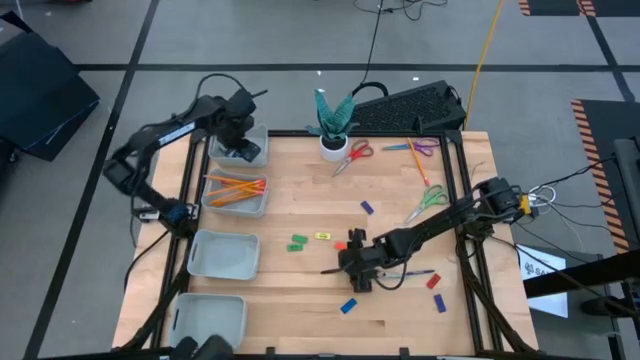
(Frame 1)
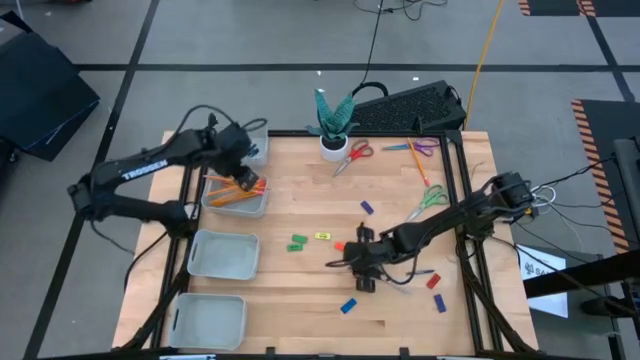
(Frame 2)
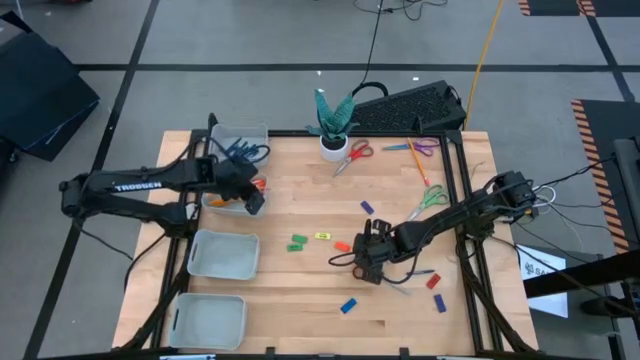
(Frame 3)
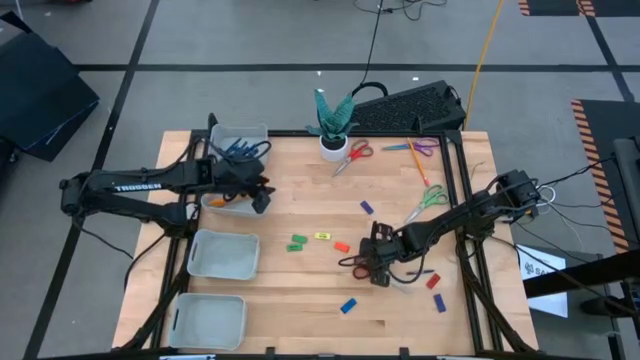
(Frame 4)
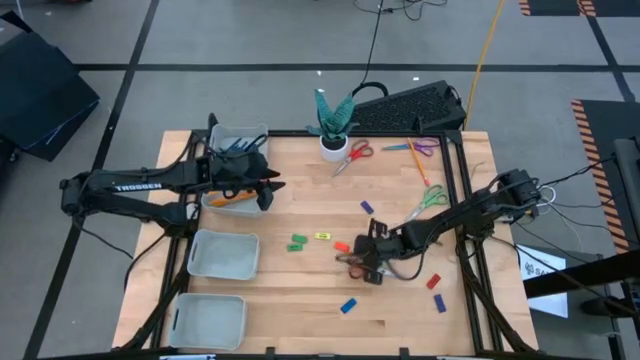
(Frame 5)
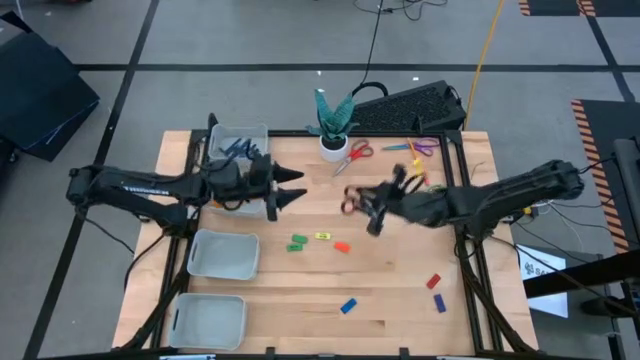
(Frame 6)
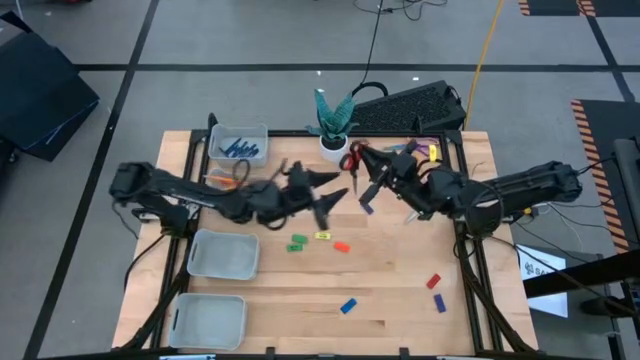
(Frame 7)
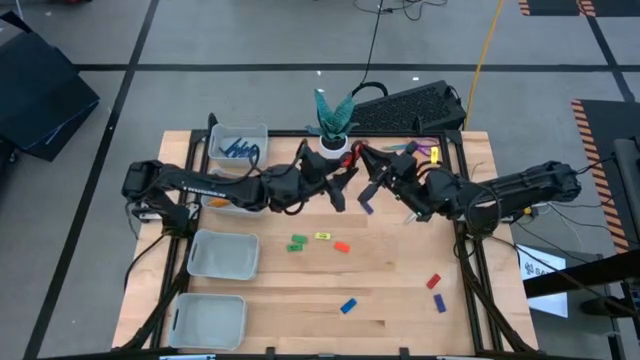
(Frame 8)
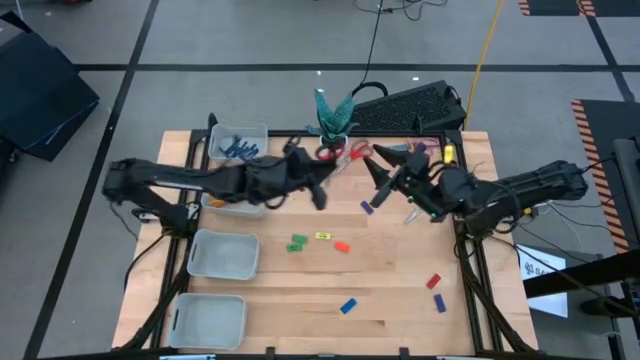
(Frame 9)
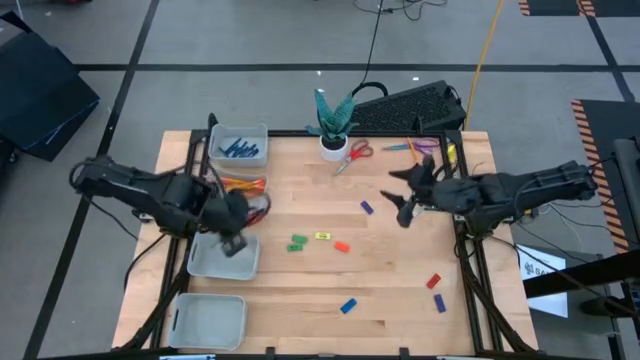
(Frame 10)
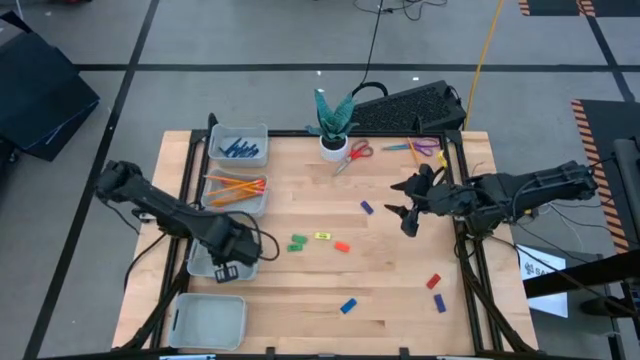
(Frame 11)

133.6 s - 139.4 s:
Task: Sort crayons/erasers/pens/pencils in bins
Put the black scissors into the middle bottom gray bin

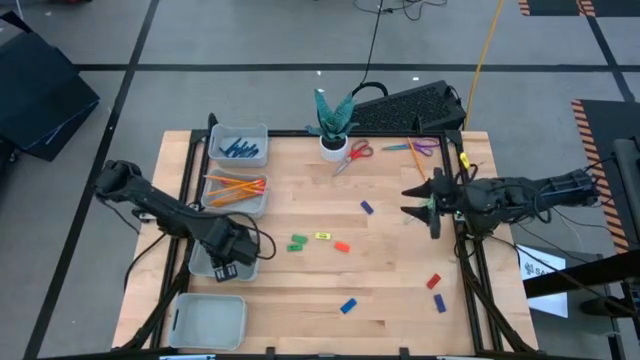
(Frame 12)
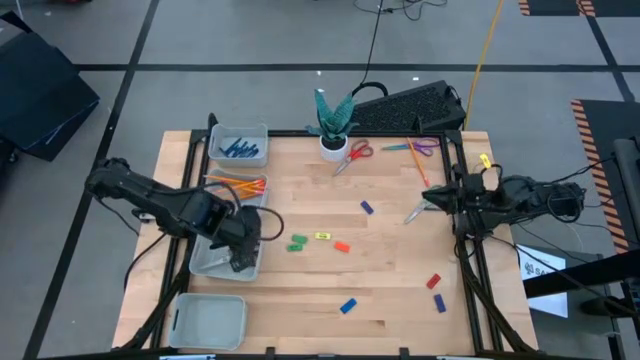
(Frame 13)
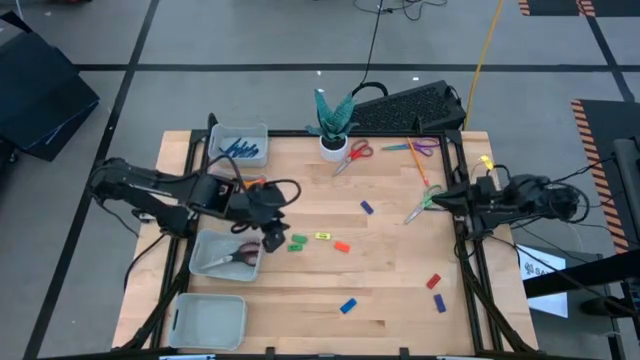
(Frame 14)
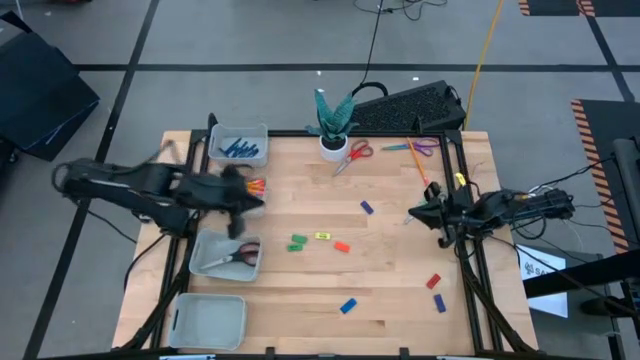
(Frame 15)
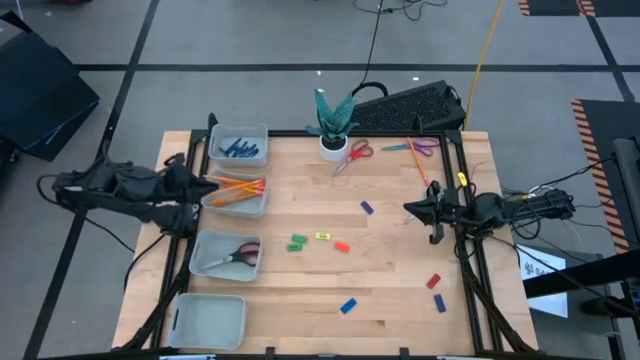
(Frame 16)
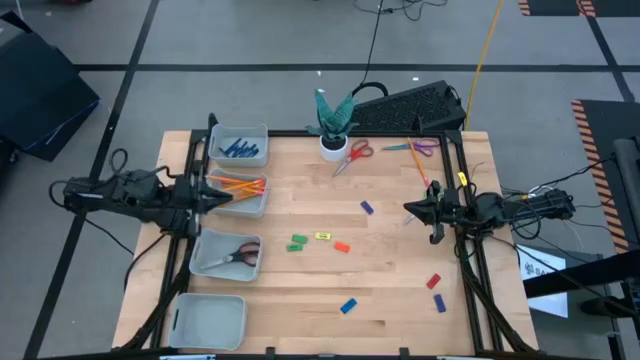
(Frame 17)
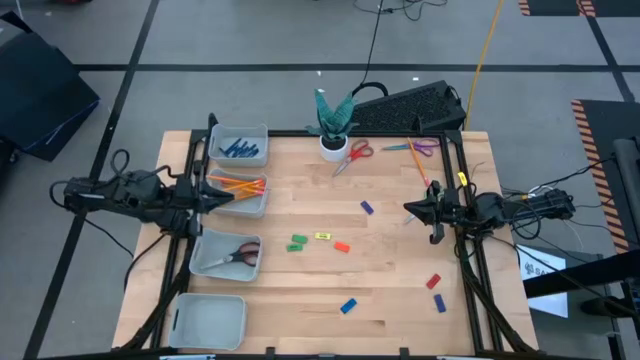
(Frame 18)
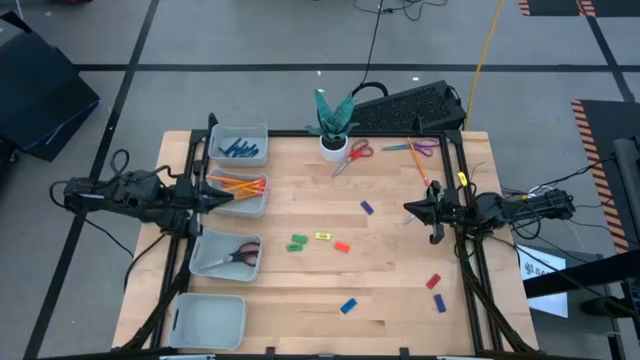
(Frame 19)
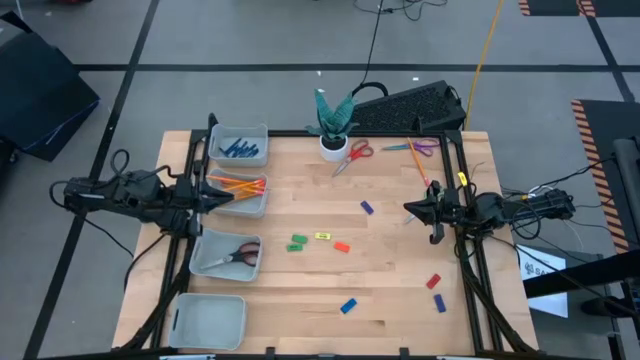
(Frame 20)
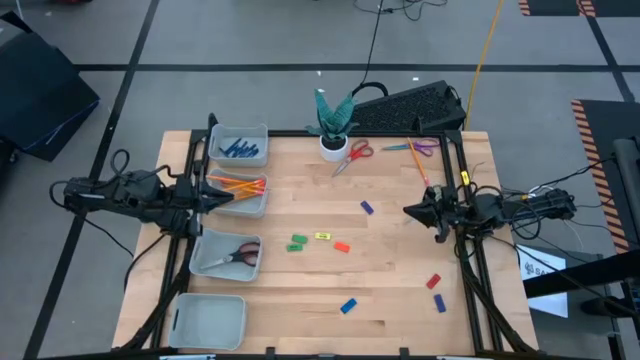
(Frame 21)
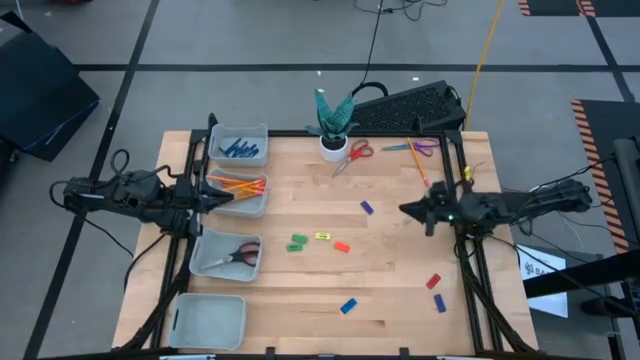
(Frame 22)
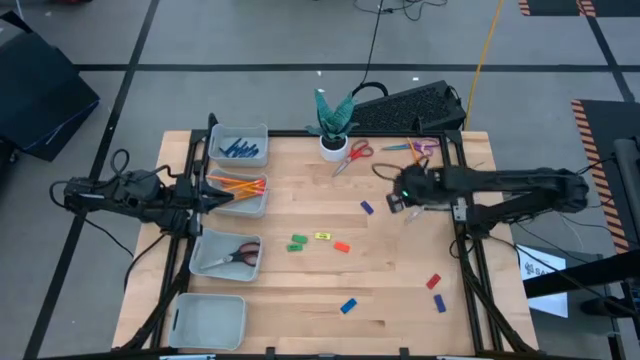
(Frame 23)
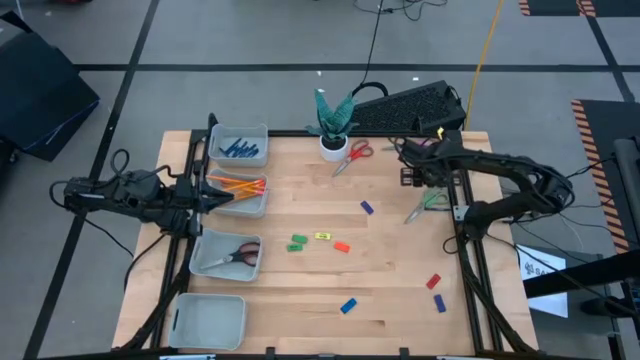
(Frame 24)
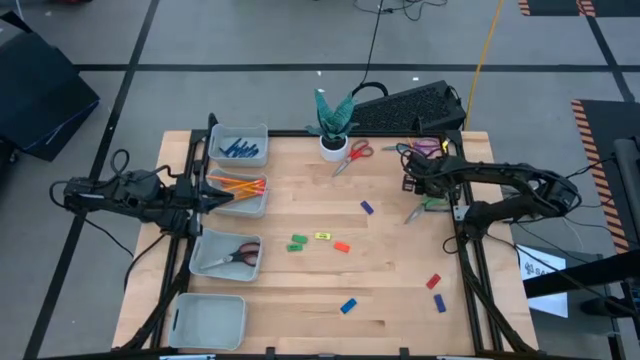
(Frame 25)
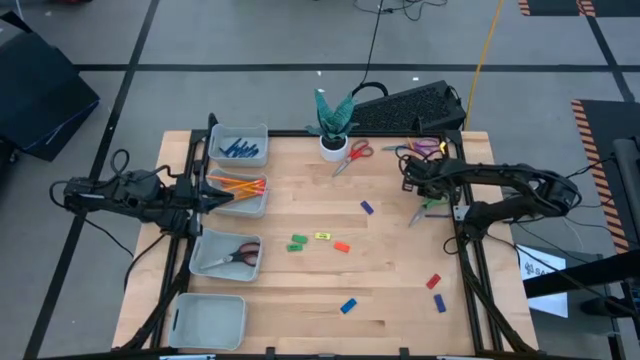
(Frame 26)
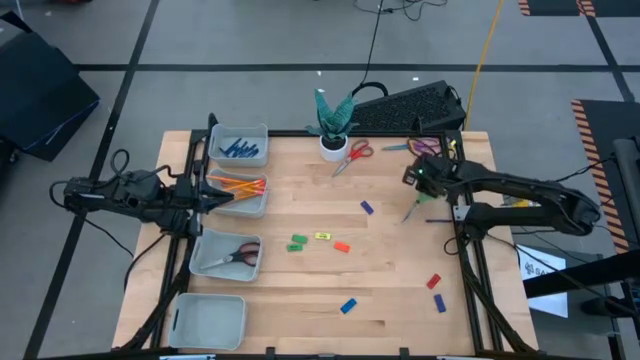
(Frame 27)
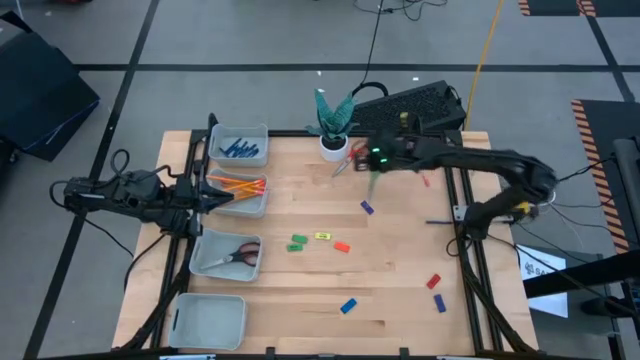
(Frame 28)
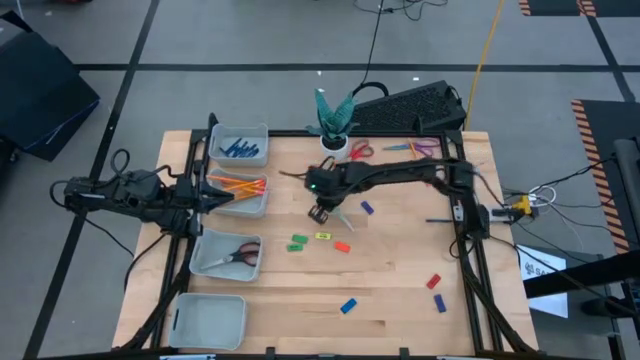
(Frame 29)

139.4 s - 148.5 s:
Move the green scissors to the center of the table

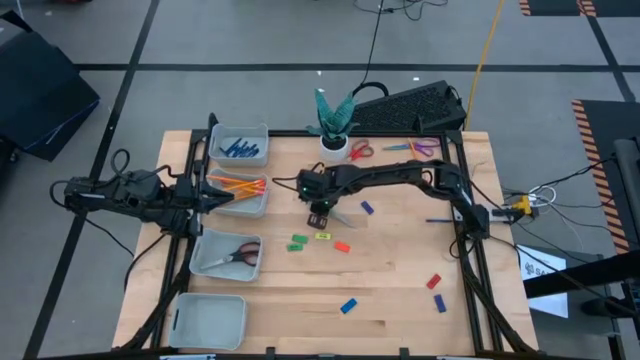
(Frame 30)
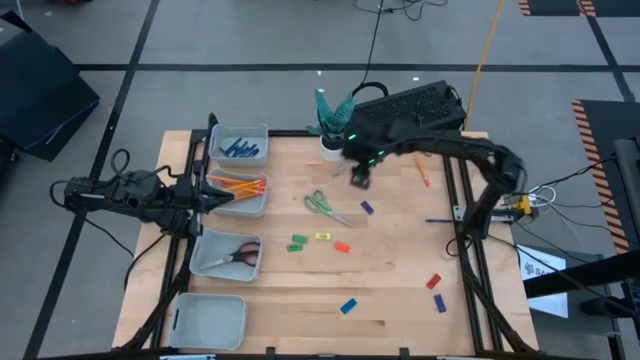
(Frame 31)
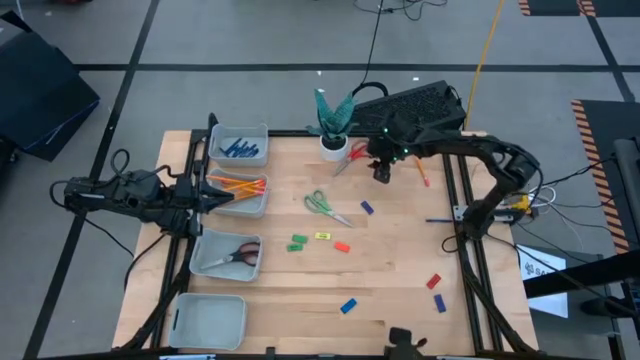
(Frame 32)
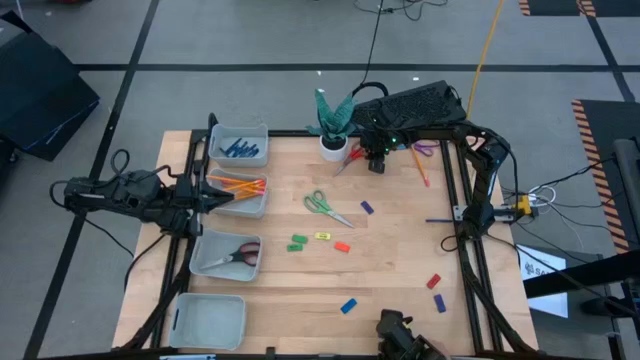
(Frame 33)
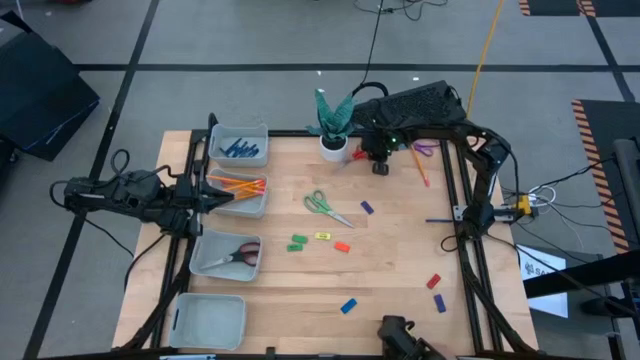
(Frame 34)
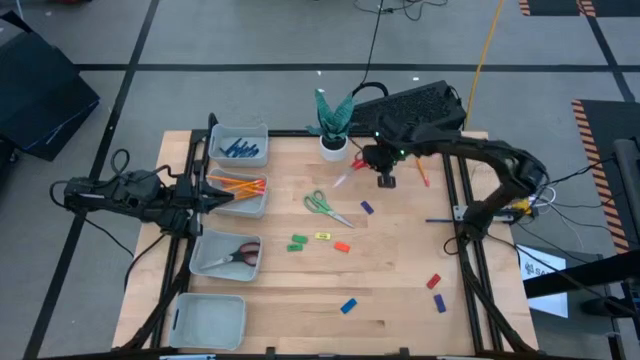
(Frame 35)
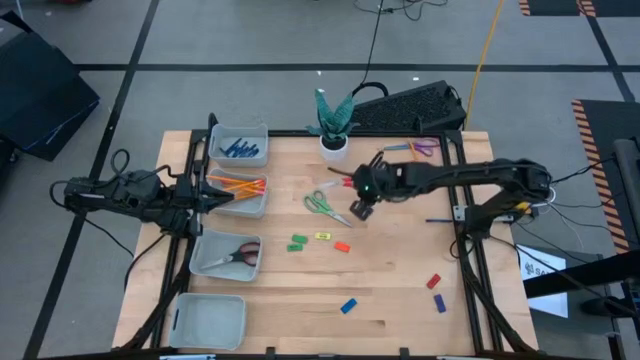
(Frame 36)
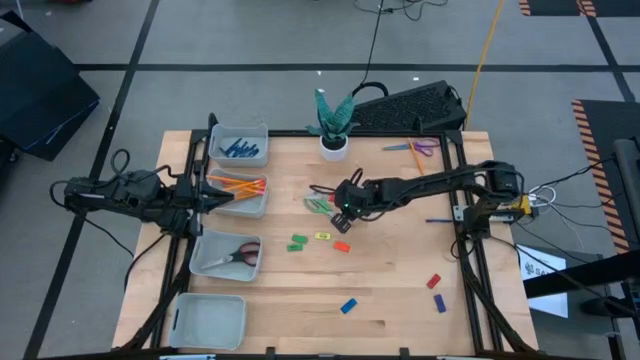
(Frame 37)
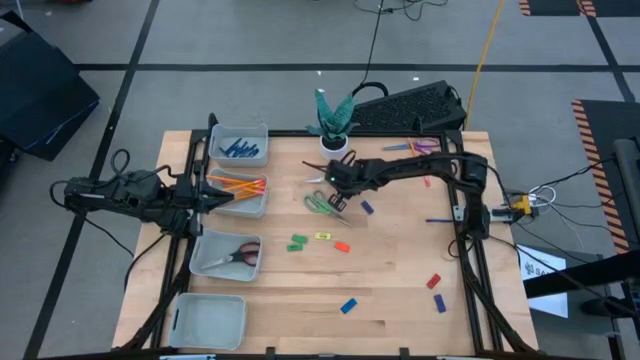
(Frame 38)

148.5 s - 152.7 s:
Move the orange scissors to the center of the table

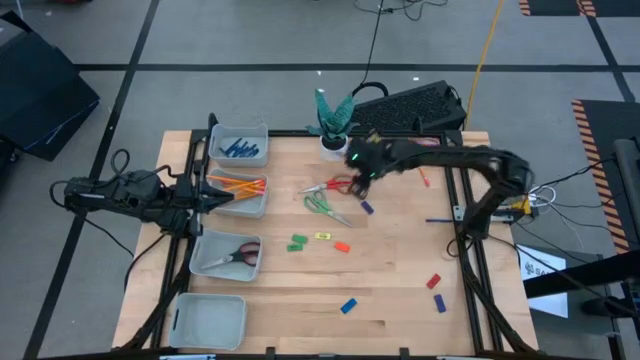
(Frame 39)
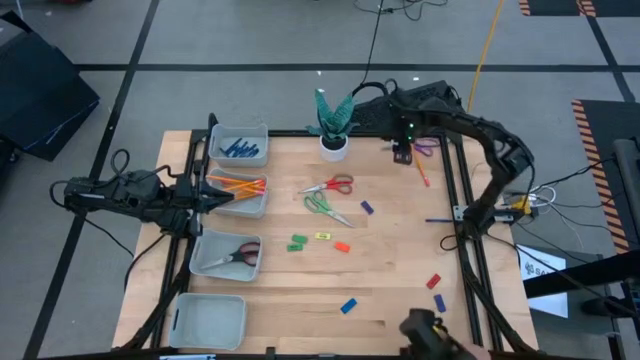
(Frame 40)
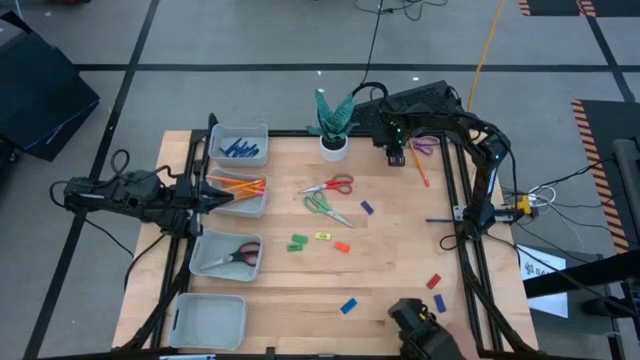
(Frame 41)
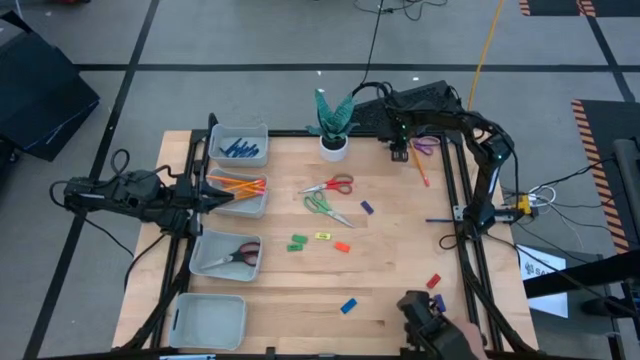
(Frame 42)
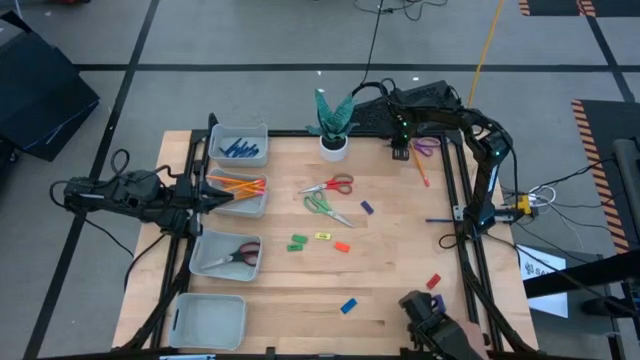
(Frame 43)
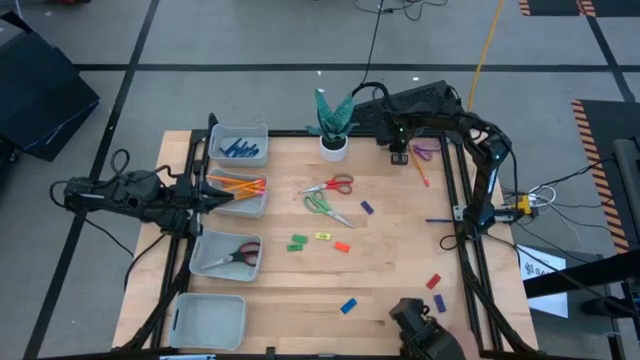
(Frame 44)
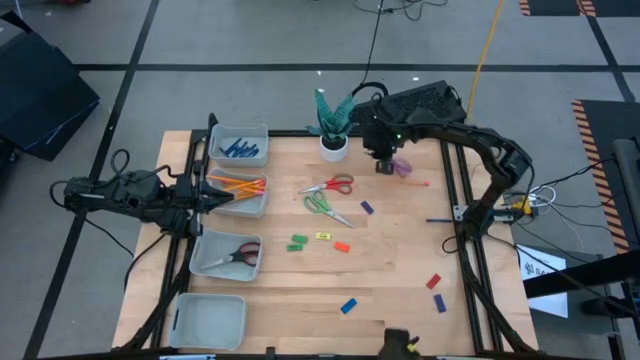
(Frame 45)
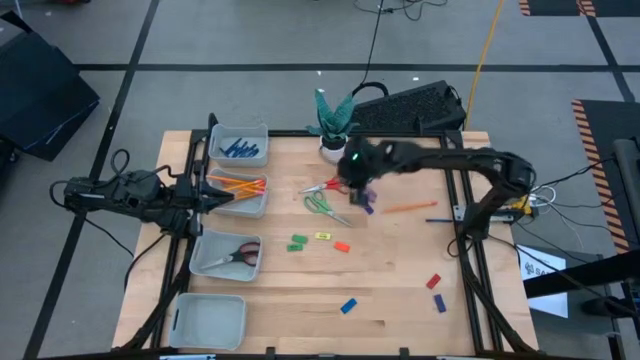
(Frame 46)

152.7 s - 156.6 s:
Move the purple scissors to the center of the table
